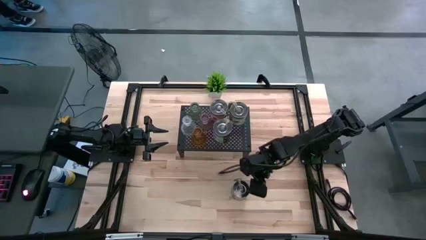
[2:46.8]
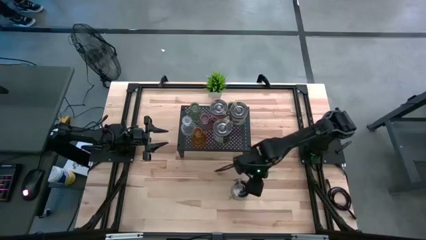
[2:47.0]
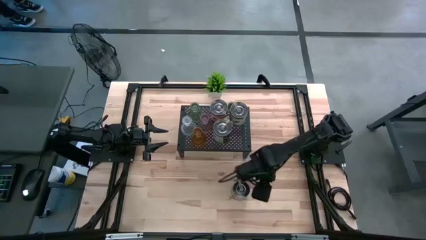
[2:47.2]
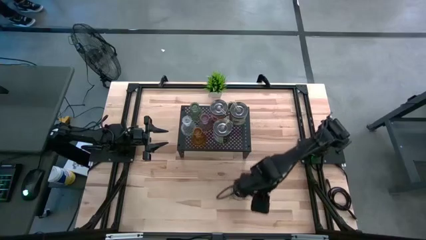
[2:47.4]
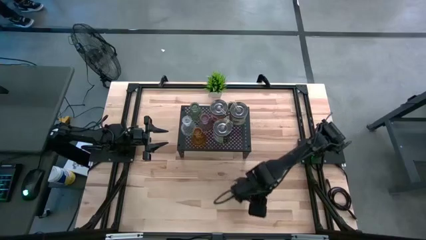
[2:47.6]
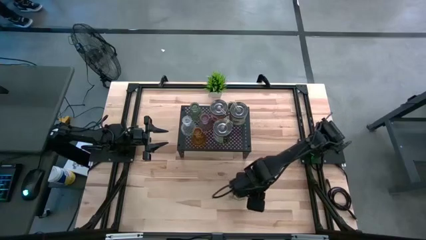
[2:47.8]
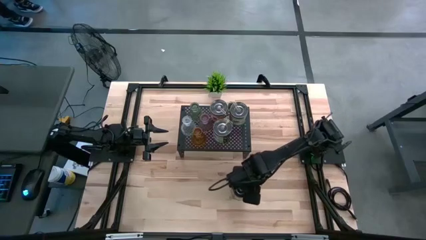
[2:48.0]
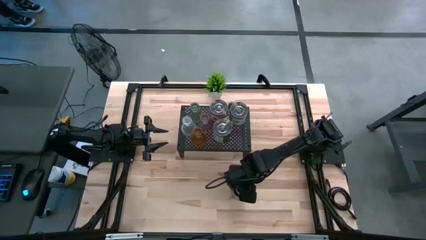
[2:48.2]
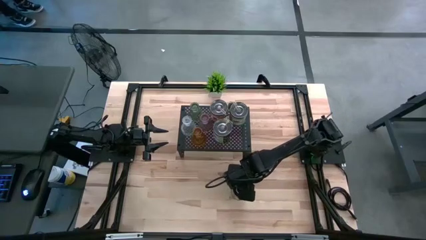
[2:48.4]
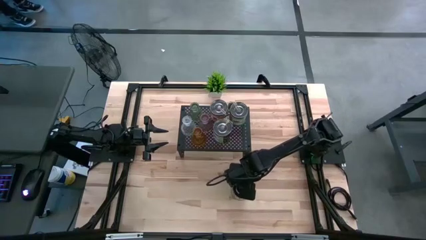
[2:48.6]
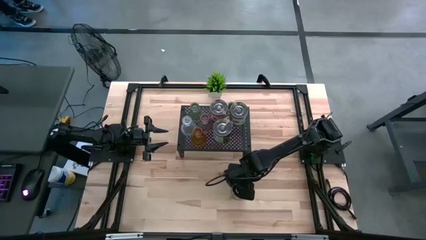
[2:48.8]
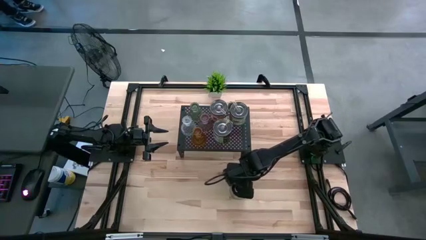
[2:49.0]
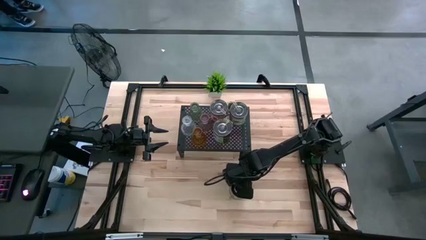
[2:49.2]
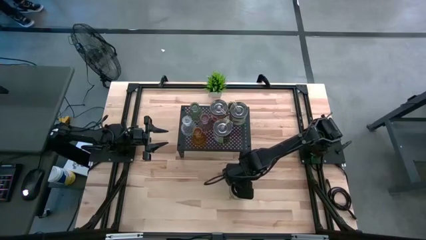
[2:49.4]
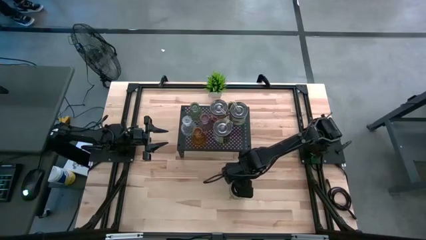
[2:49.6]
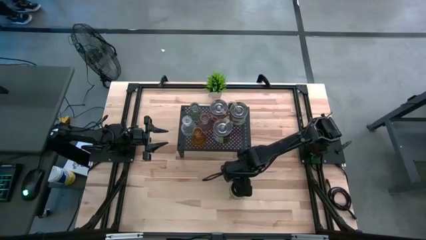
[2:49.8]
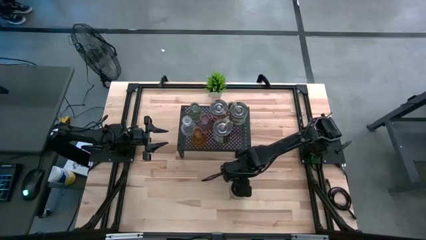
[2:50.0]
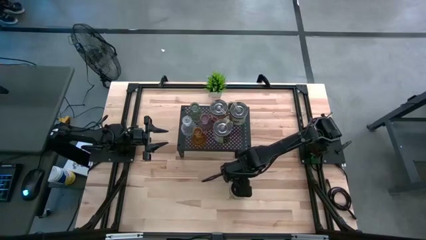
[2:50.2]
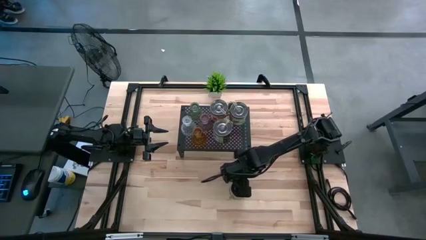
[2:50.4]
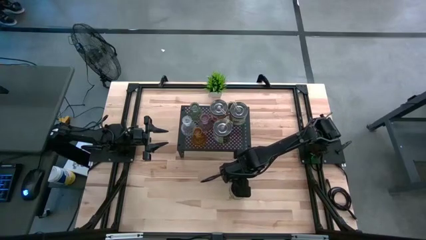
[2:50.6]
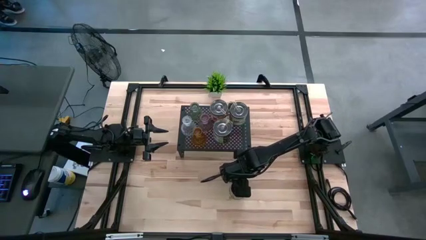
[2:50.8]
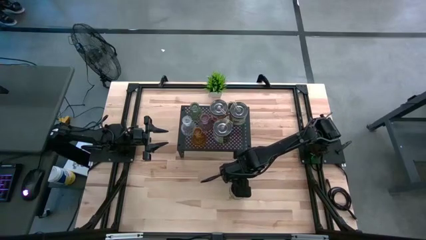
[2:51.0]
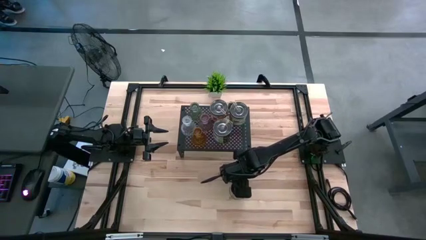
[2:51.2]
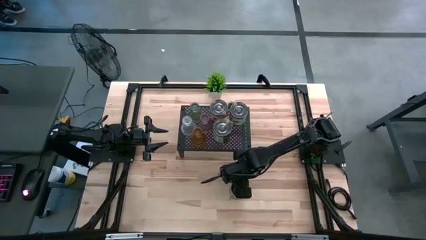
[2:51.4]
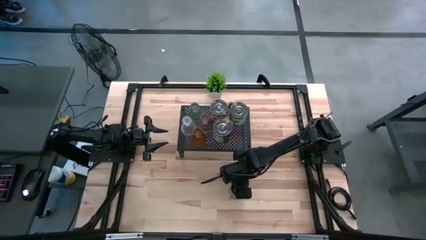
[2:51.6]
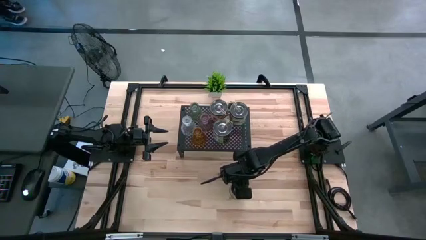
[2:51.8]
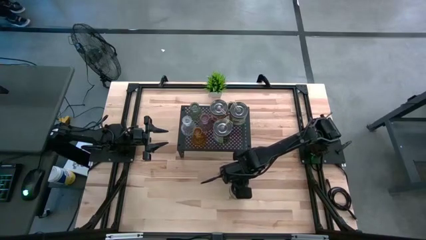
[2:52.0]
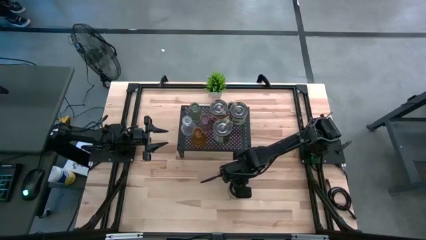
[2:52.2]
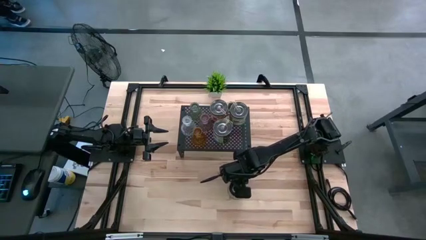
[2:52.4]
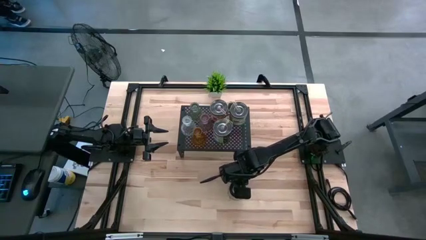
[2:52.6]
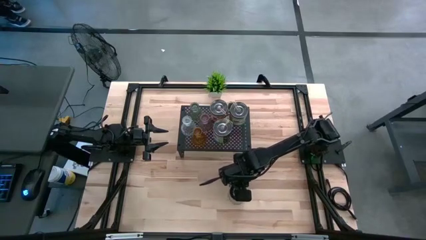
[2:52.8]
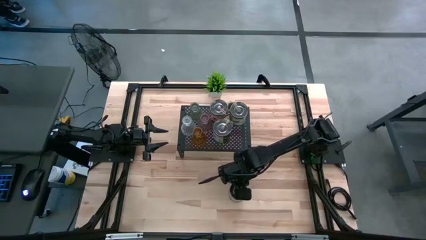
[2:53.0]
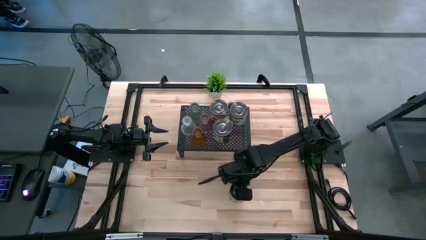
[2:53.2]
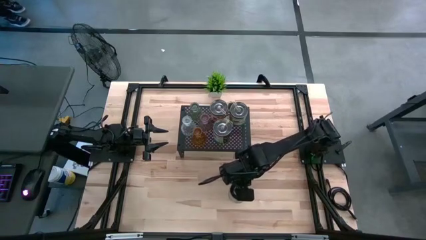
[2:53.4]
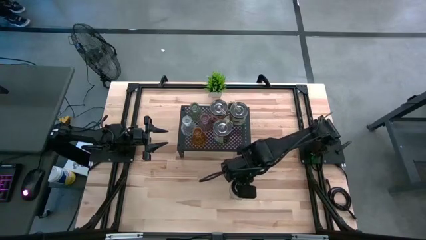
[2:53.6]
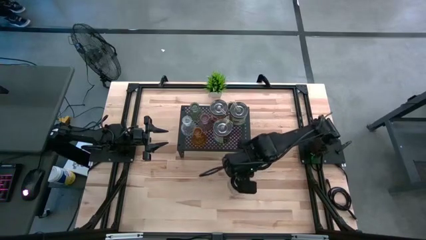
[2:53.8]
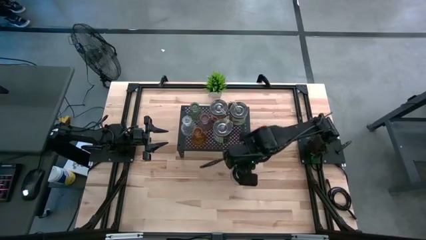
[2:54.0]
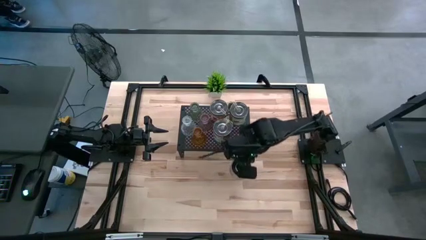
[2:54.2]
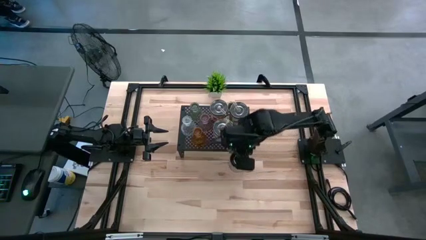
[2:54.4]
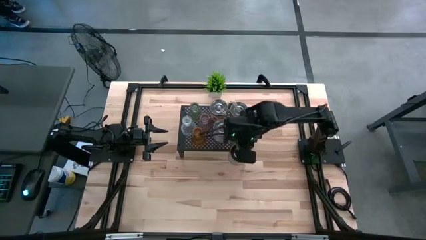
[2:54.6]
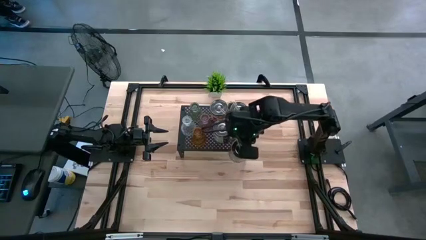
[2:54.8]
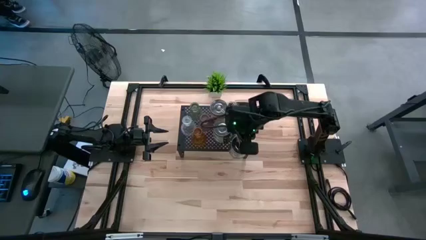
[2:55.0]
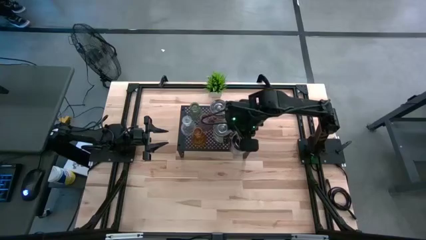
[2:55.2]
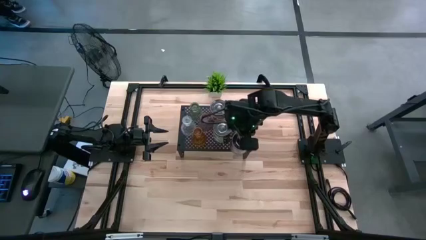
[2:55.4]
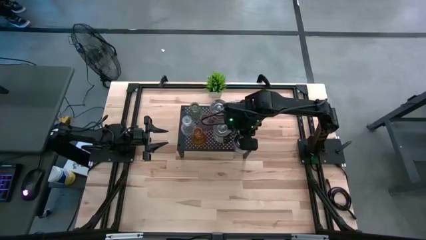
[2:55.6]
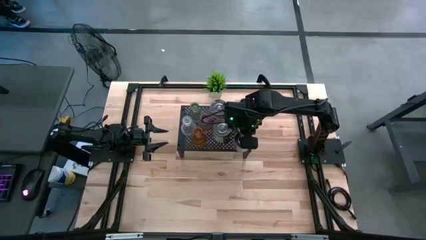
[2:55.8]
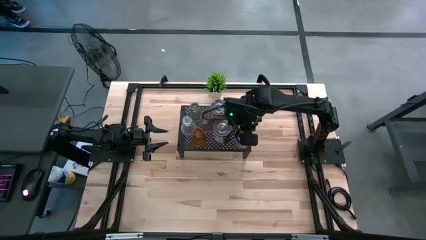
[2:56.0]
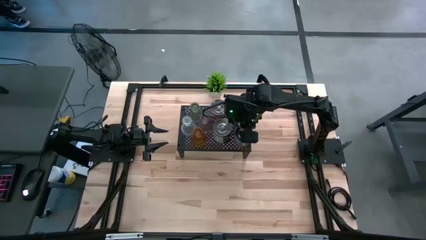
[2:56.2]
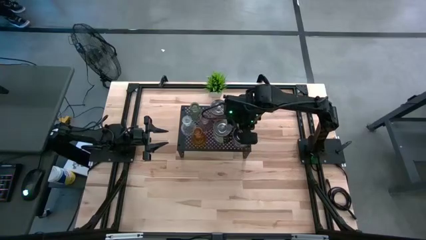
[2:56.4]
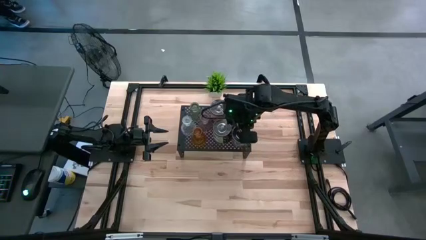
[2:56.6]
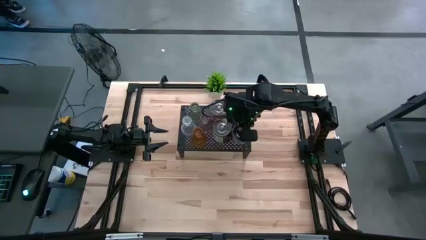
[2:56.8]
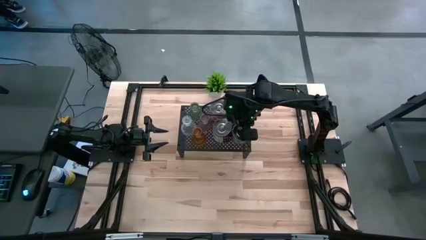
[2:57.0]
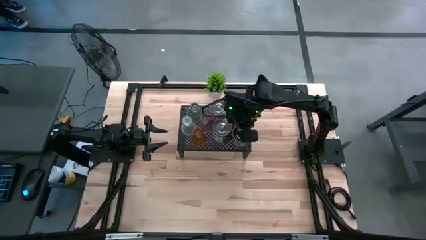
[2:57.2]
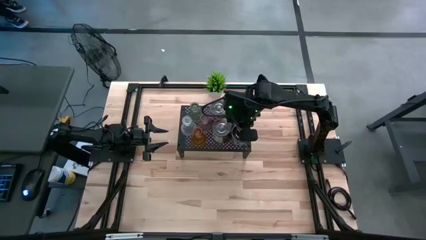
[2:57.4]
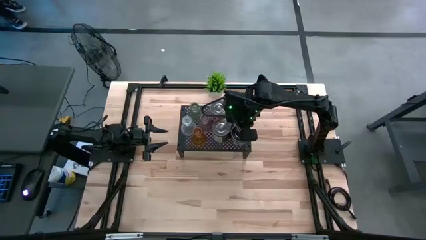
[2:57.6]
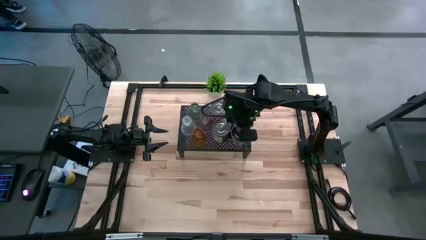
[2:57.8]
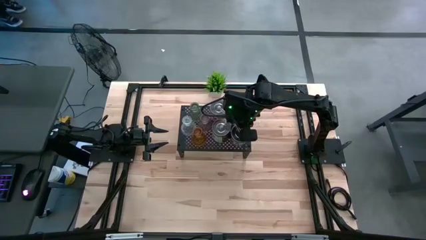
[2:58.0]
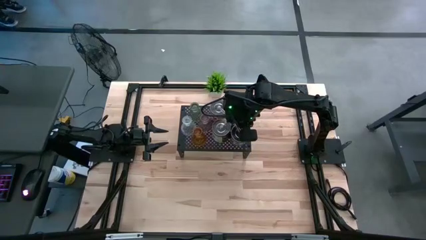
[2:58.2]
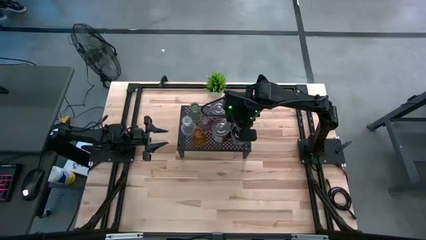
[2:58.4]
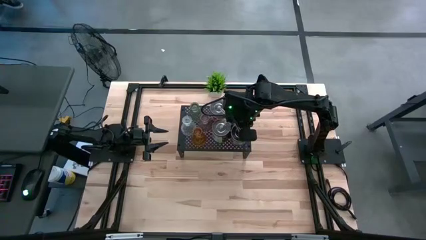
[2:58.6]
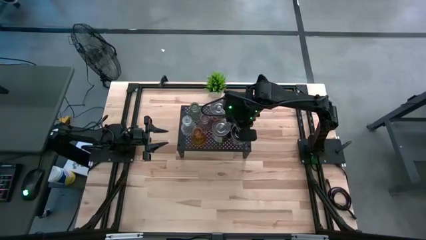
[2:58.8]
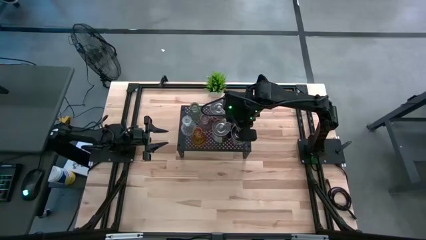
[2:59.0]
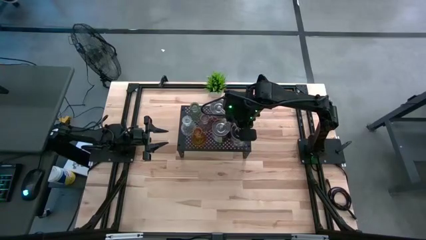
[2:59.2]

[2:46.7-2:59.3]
Task: Pick & Place candle stick holders
Put the brown scented candle on the shelf

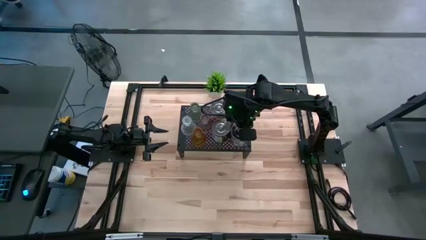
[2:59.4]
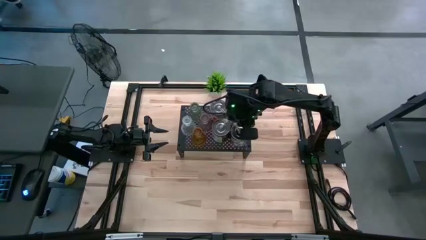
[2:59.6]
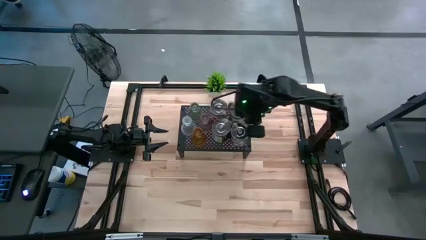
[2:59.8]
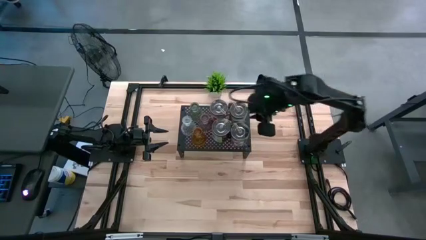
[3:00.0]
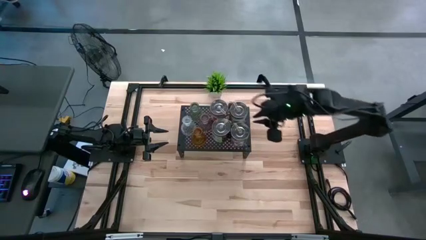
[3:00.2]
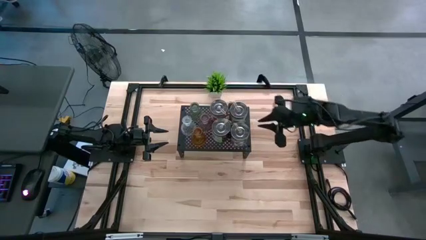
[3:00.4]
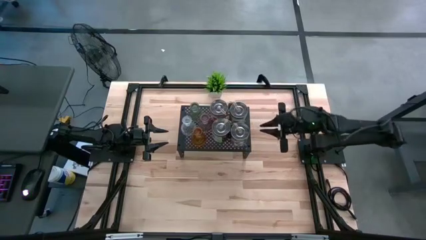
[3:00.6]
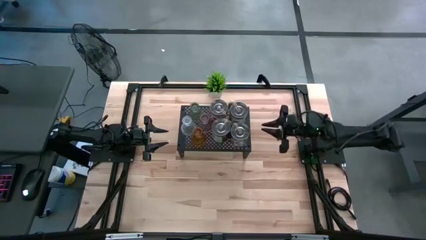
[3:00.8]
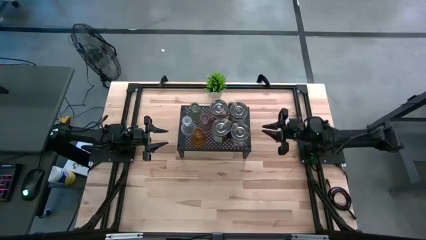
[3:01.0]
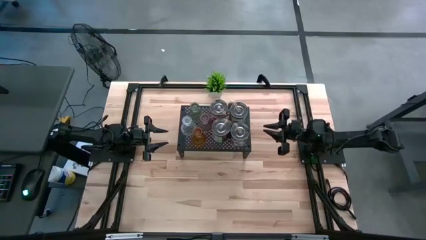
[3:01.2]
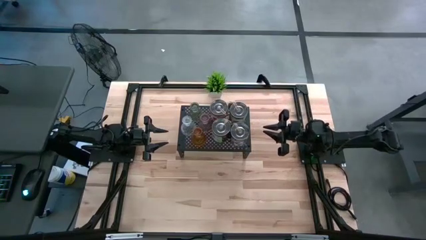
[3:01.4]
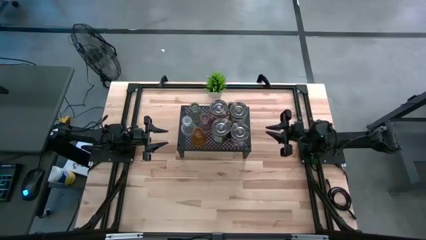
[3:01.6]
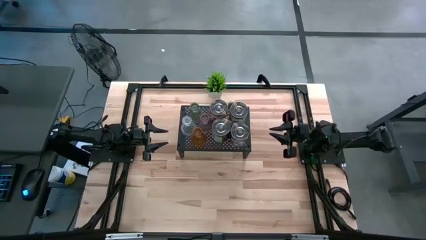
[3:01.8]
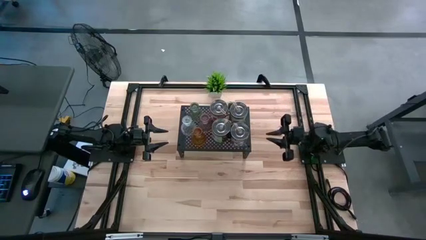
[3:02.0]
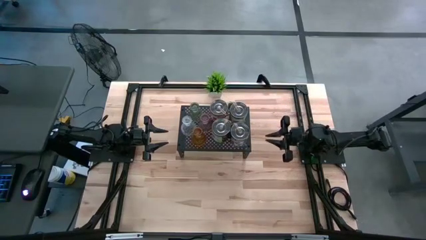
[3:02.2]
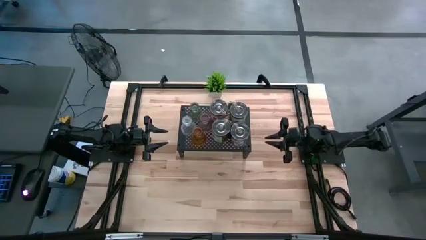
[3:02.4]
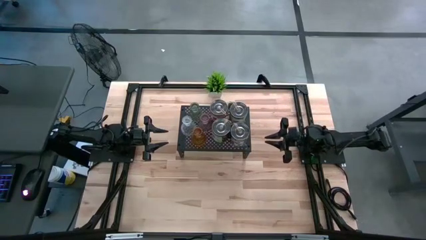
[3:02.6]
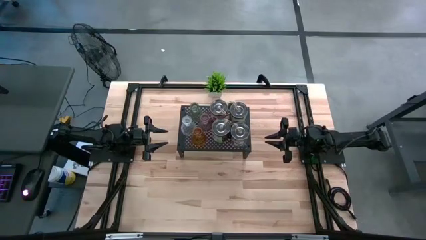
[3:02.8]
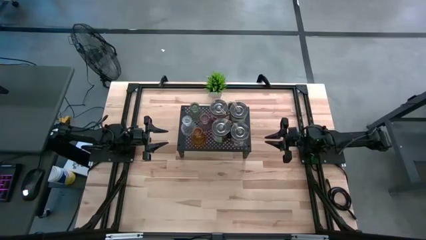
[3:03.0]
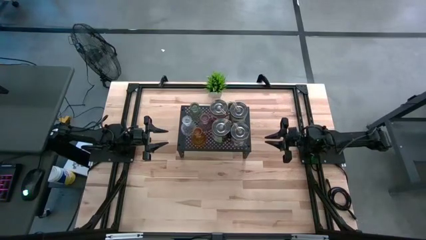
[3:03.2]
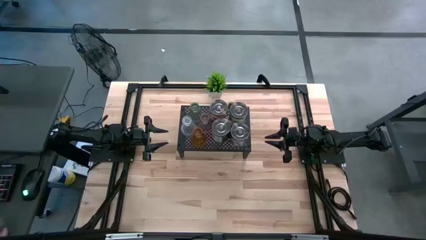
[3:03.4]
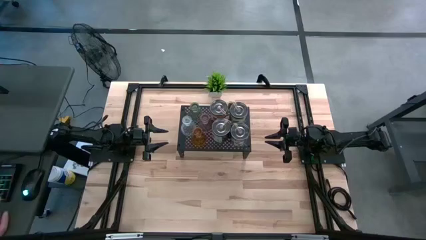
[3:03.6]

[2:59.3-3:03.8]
Return to Home Position
